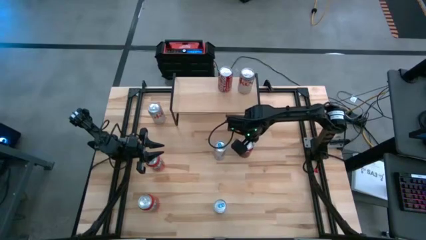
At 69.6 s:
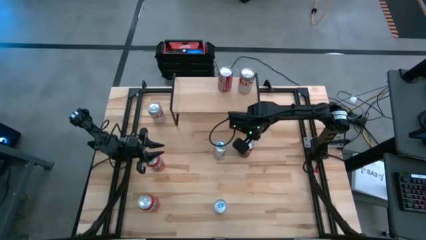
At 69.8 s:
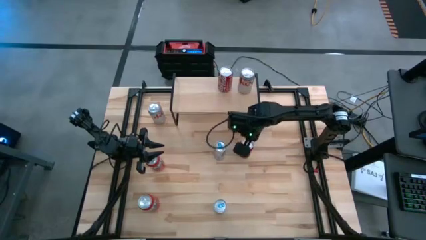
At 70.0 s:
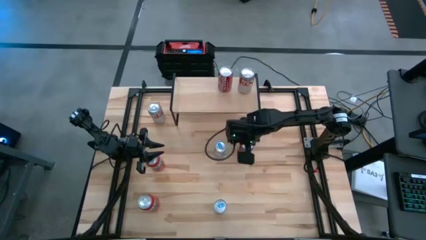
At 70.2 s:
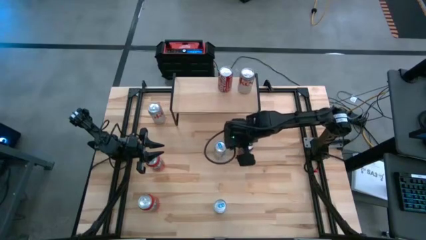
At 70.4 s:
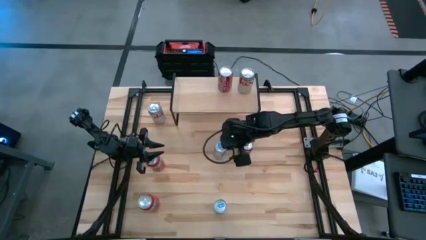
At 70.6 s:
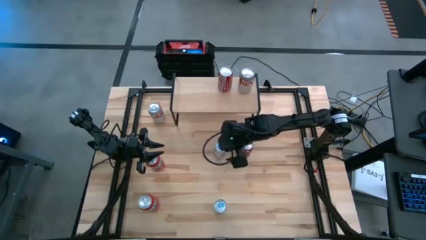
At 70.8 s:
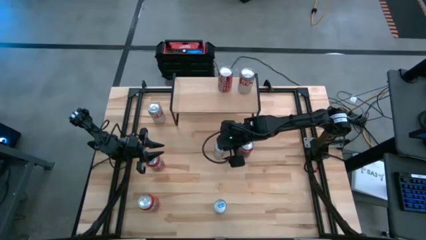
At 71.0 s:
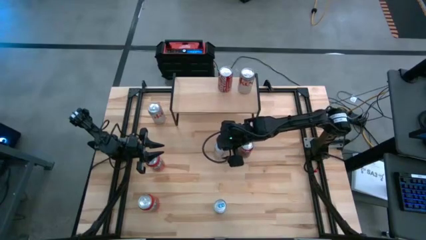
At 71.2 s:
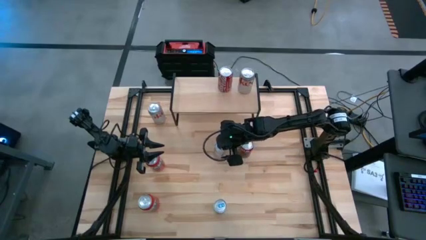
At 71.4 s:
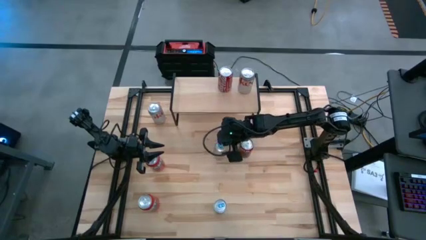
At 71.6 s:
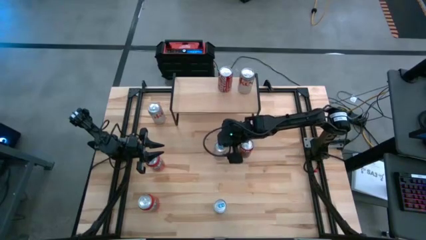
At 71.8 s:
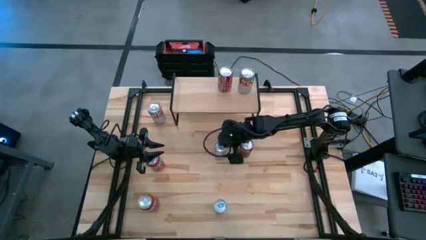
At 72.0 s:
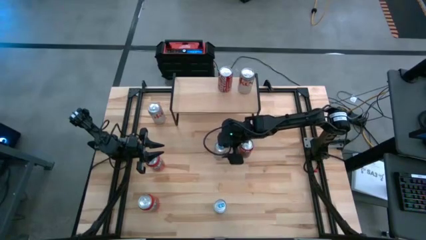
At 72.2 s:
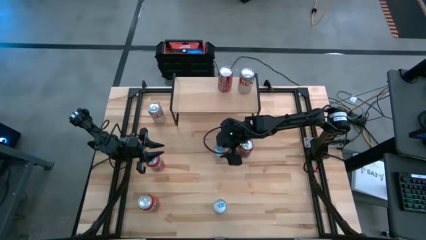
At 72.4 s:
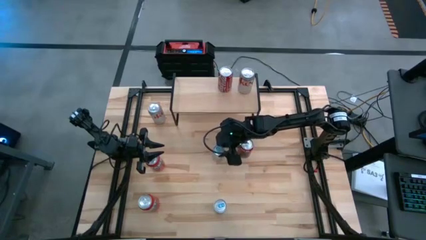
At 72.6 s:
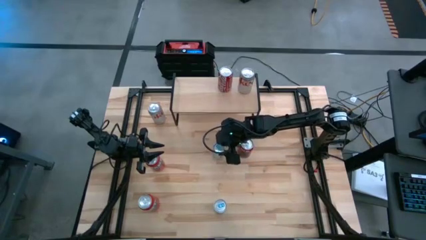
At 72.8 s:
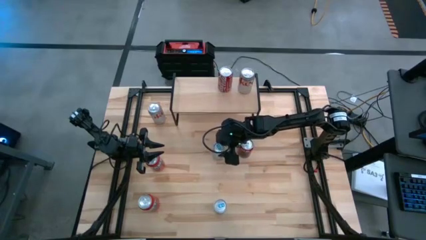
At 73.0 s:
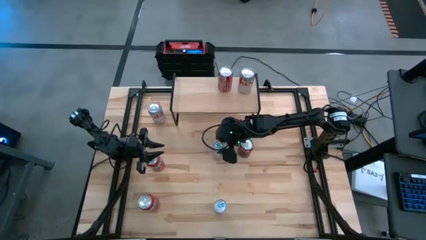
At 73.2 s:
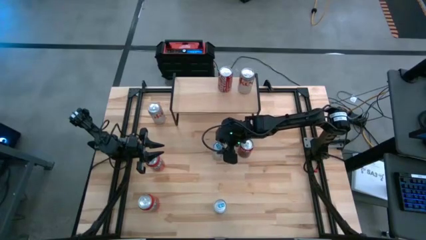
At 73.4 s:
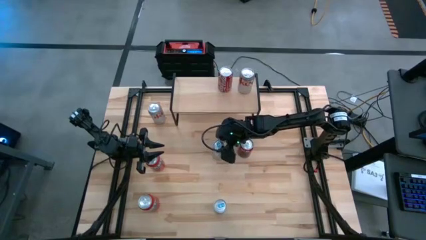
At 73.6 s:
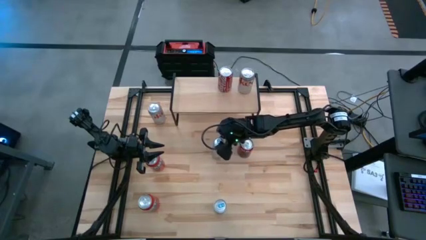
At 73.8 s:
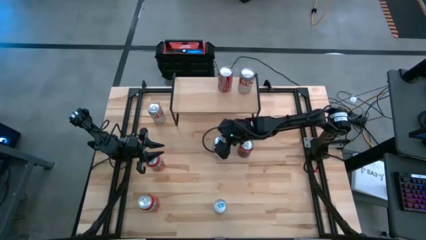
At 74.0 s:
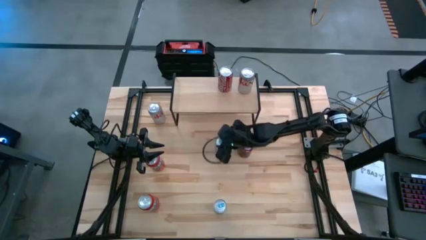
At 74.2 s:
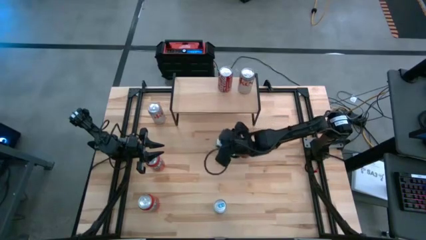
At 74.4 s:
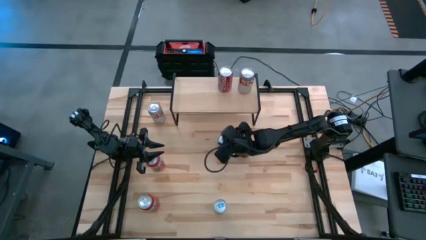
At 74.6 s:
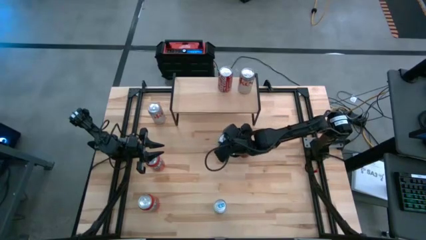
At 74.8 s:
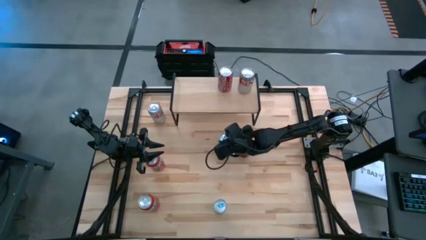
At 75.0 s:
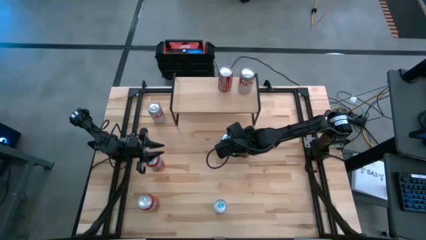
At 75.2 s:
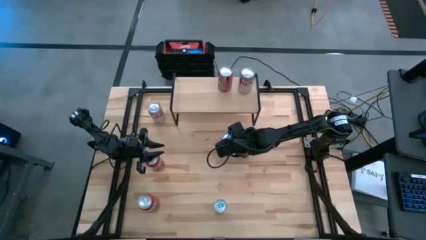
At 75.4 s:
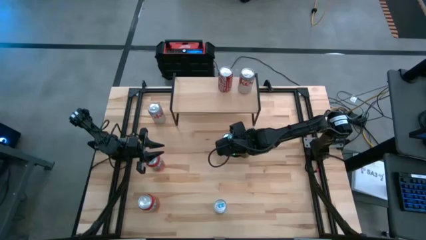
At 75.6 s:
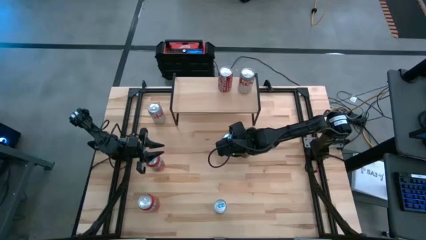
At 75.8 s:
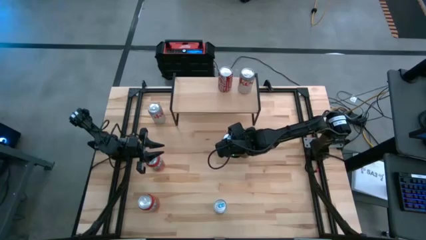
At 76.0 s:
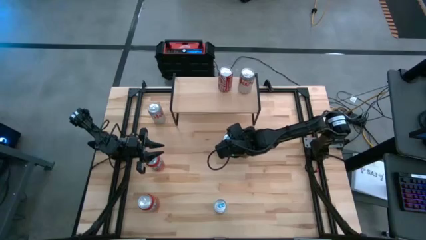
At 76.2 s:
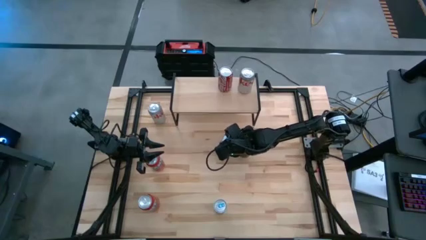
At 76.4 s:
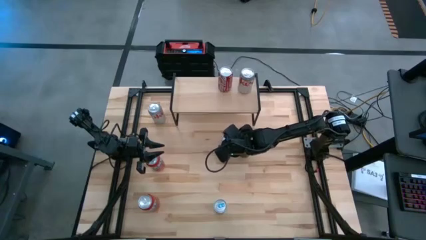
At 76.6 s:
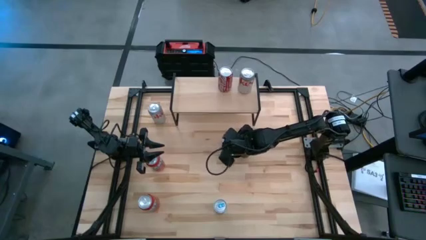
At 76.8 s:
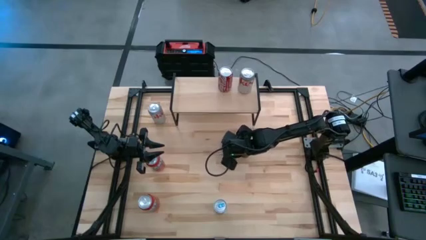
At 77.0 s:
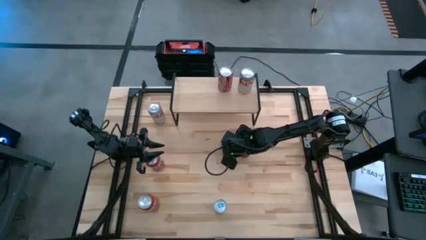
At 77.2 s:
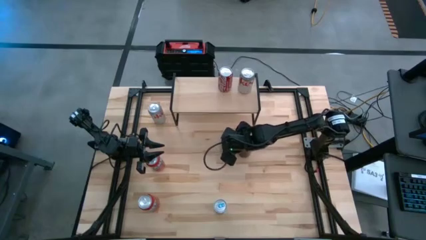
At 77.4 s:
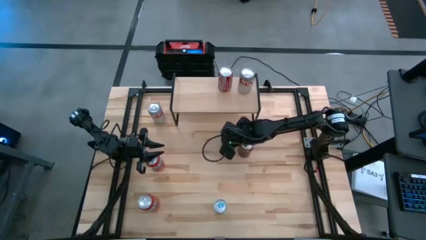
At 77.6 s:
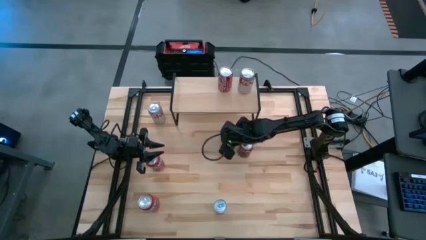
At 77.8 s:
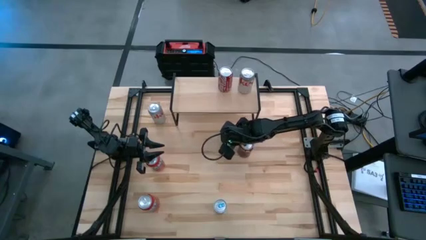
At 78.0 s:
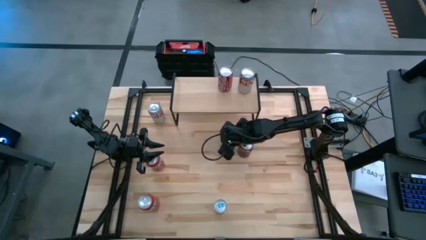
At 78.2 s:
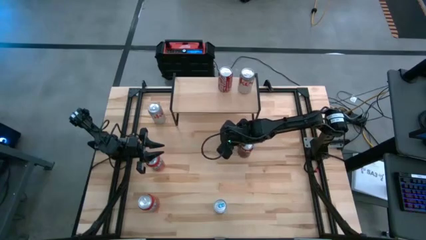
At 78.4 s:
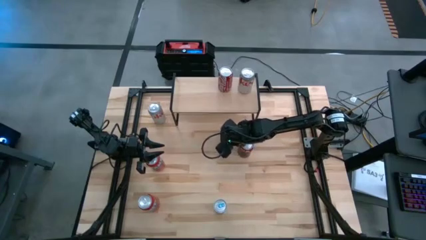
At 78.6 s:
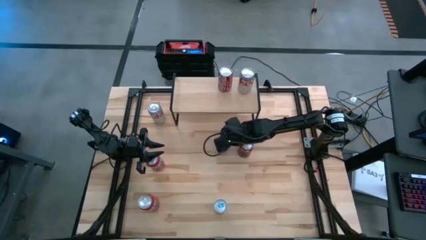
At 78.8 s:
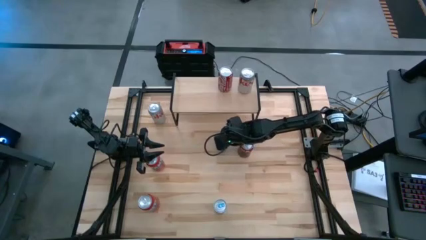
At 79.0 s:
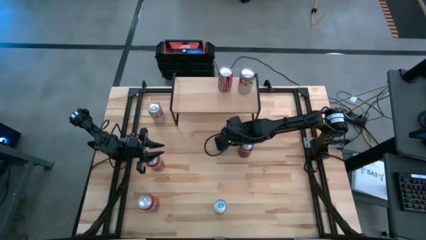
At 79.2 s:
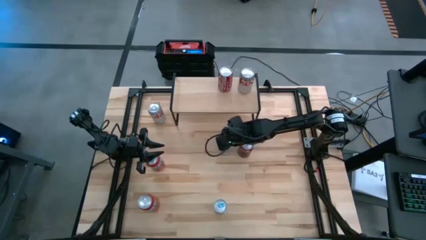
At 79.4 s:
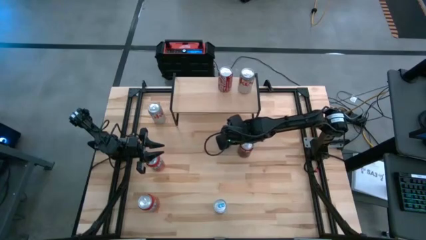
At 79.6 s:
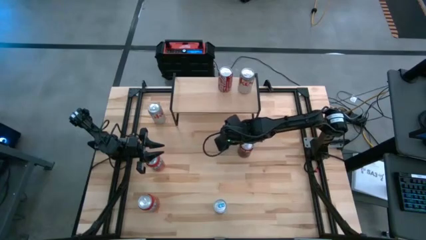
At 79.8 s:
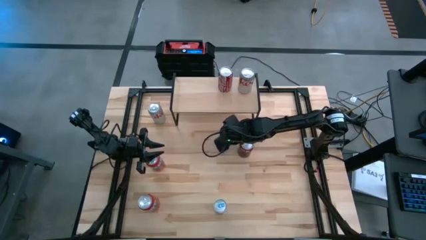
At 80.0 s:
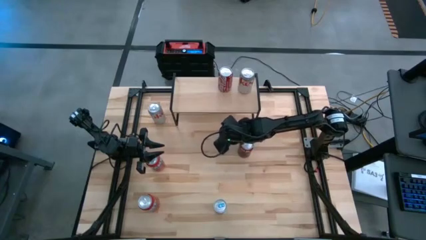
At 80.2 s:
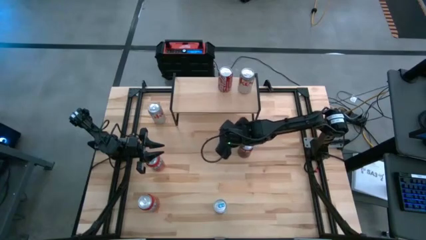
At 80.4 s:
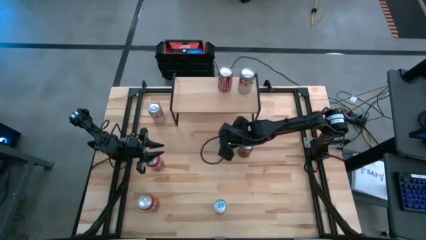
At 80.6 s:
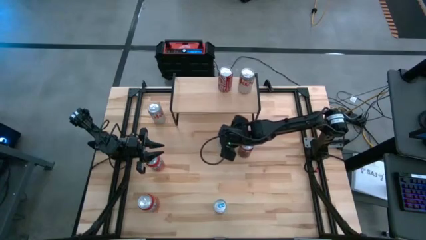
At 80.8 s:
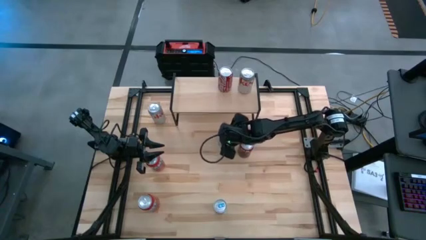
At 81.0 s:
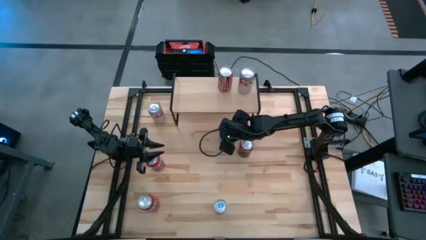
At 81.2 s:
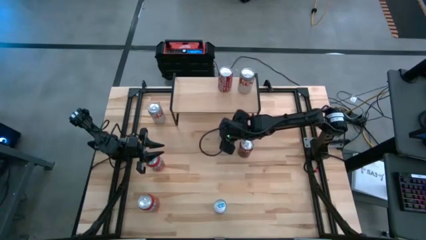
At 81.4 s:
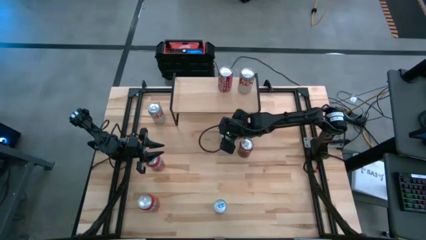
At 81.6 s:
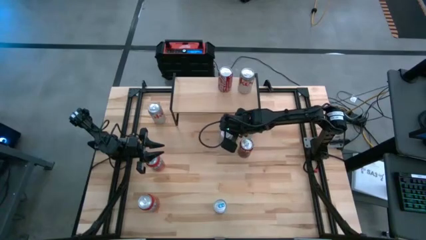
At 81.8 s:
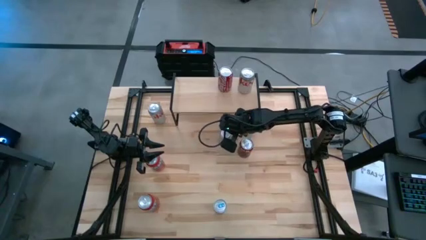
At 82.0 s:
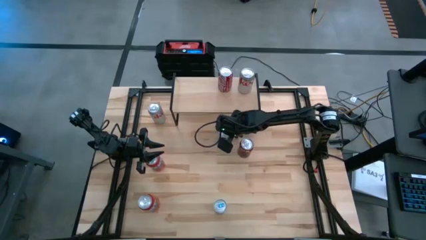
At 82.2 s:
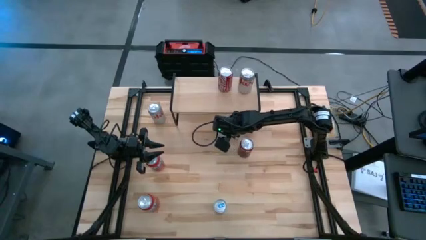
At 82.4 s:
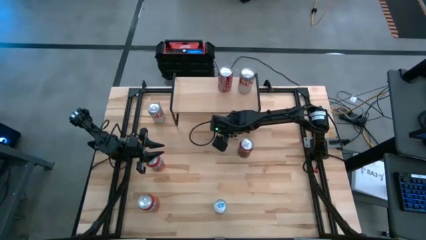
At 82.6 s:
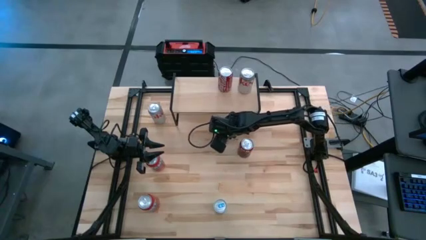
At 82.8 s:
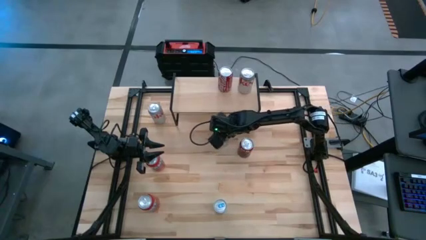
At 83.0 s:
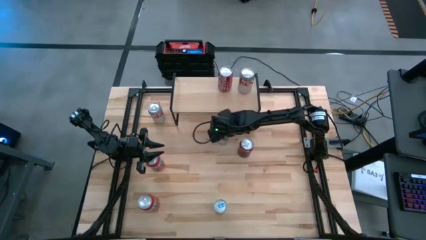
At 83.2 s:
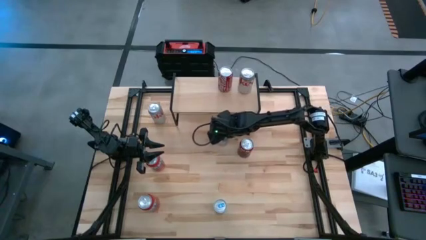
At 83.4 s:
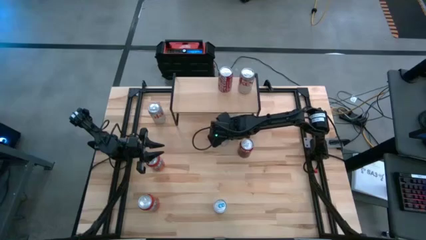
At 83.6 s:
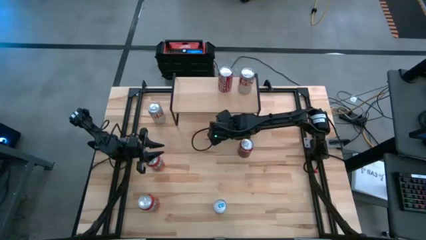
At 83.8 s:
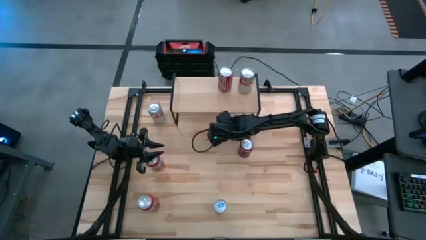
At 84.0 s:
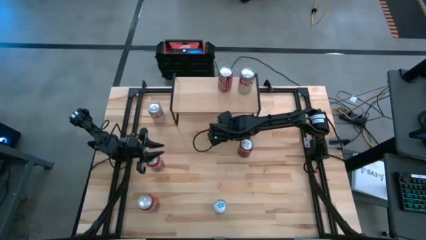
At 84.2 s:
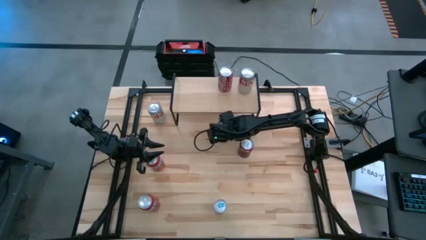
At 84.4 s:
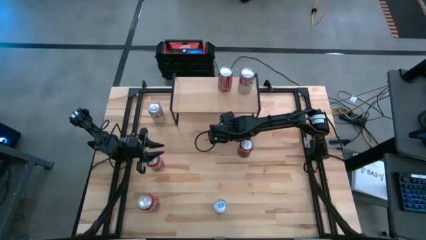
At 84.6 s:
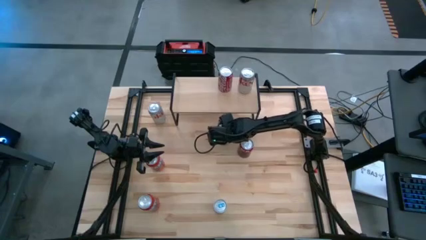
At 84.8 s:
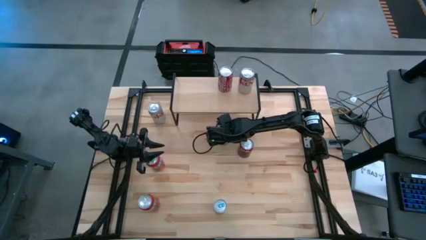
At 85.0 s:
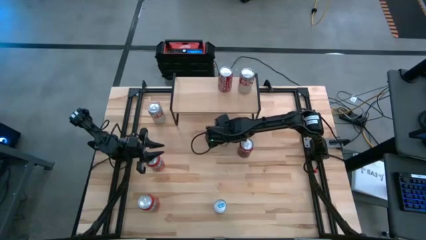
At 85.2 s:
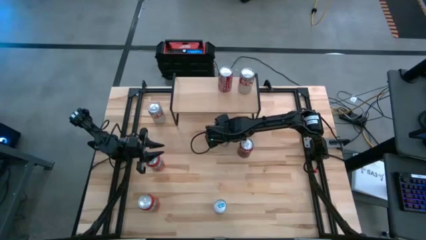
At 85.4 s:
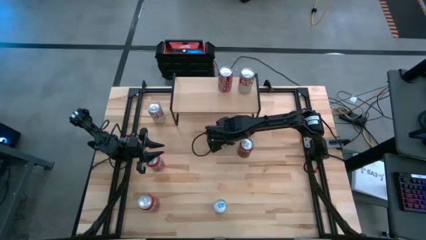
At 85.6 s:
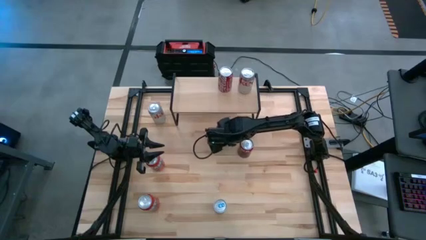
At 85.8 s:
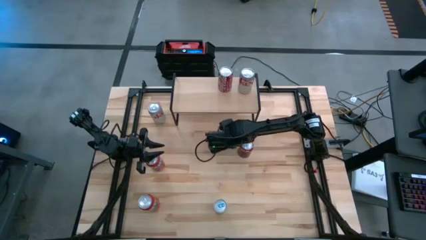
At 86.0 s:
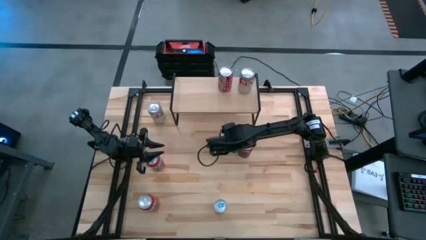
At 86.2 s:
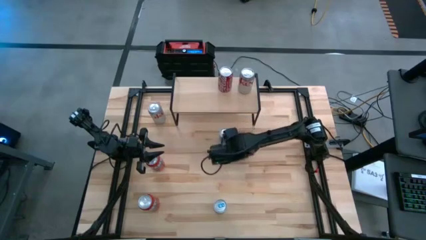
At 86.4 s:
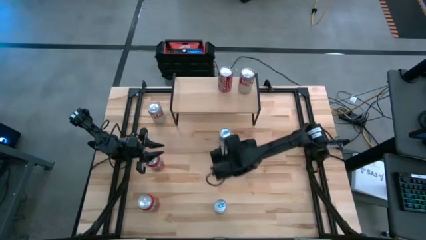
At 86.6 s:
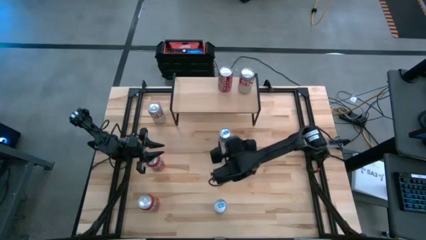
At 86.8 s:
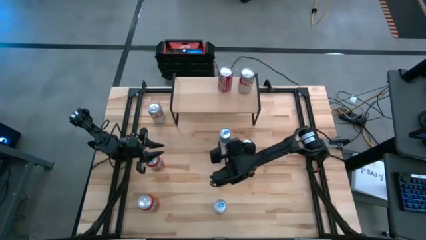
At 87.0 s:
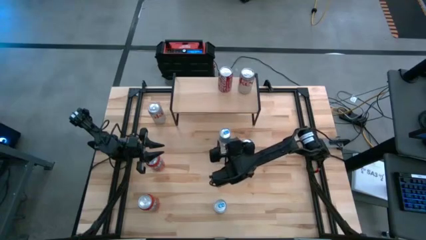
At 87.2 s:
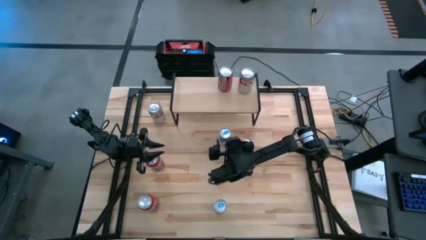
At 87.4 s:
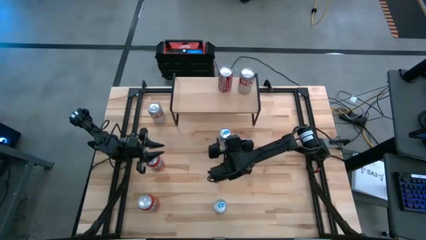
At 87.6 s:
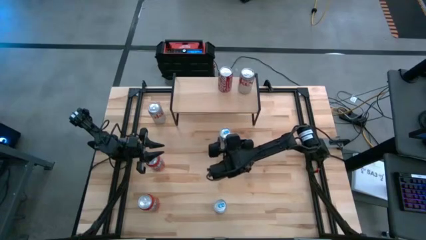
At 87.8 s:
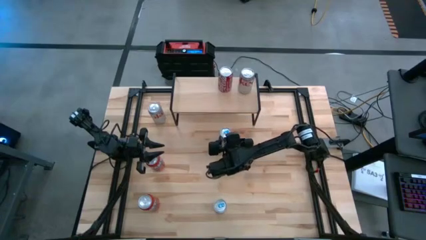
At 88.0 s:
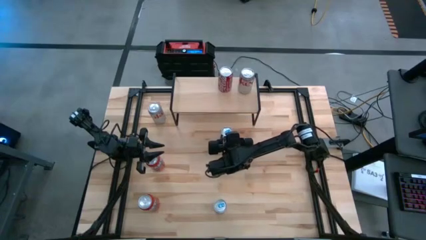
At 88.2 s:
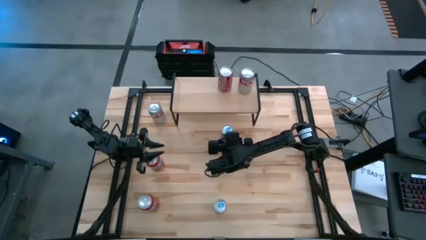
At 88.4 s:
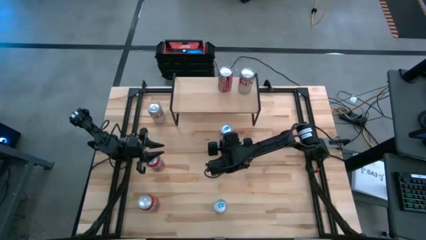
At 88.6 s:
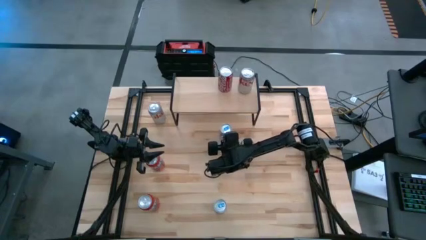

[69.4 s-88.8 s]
Task: Place canned beverage on shelf
Put the top blue and soda can on the shelf
